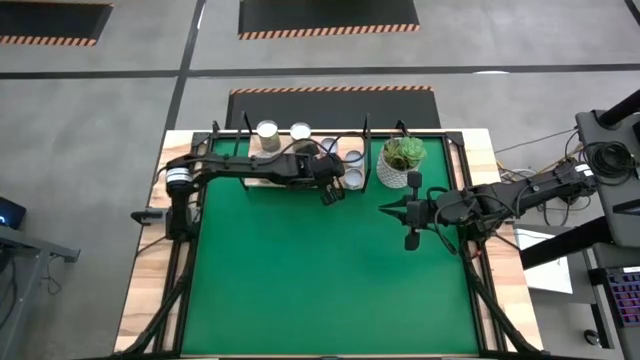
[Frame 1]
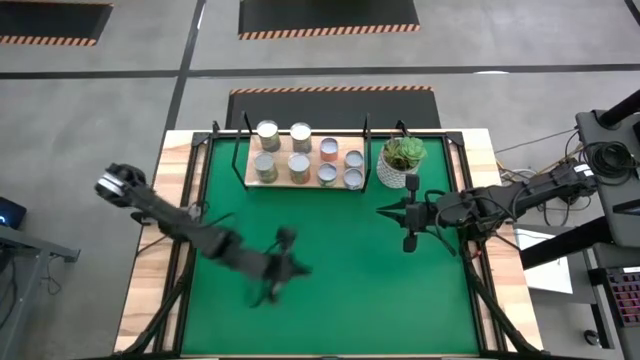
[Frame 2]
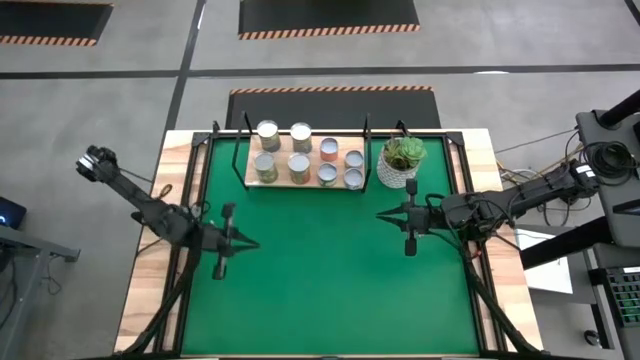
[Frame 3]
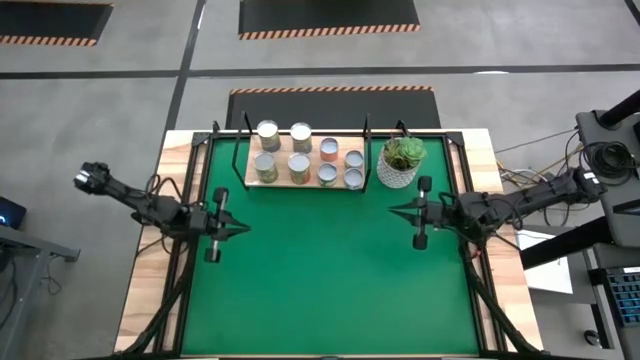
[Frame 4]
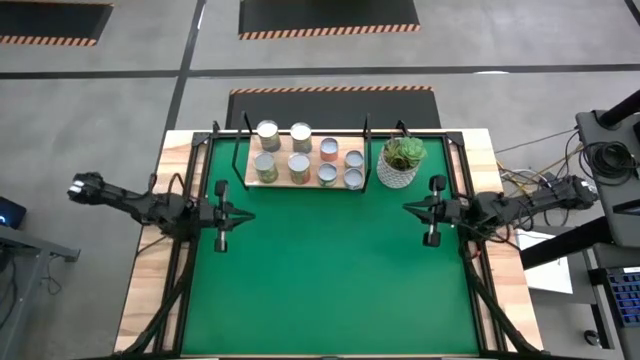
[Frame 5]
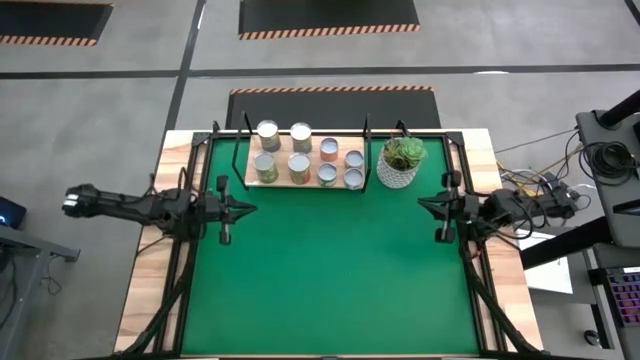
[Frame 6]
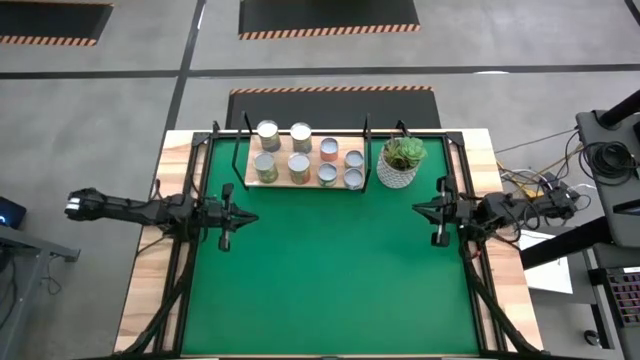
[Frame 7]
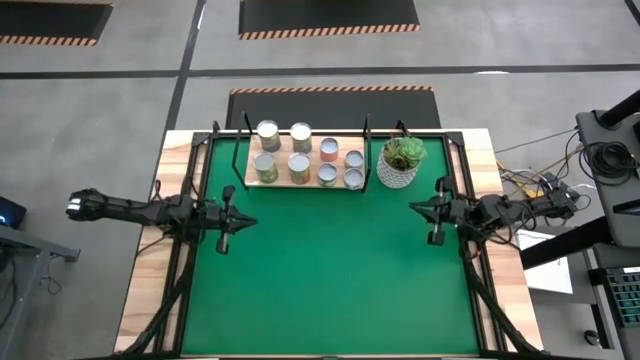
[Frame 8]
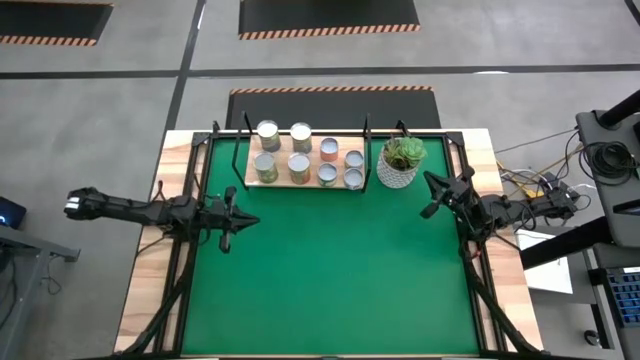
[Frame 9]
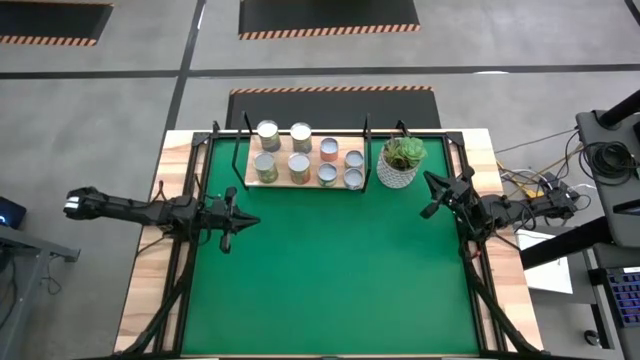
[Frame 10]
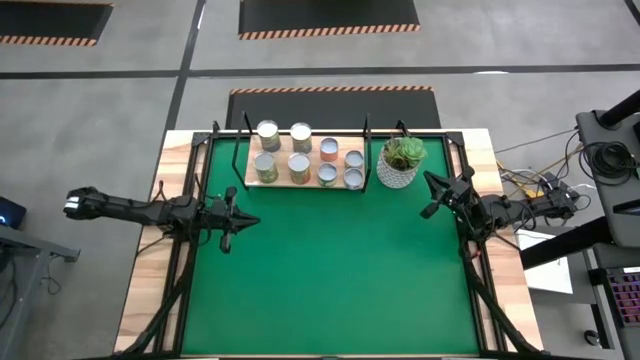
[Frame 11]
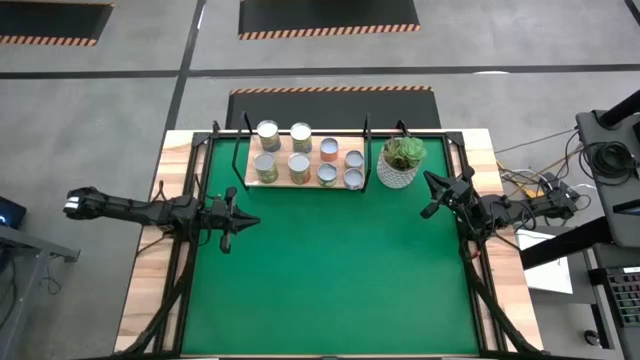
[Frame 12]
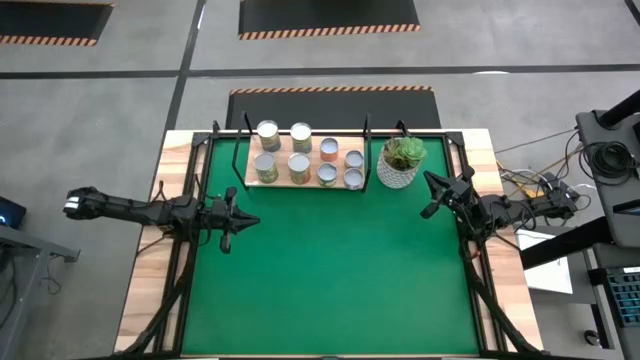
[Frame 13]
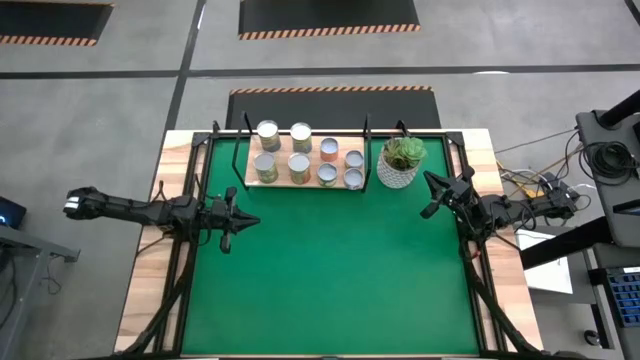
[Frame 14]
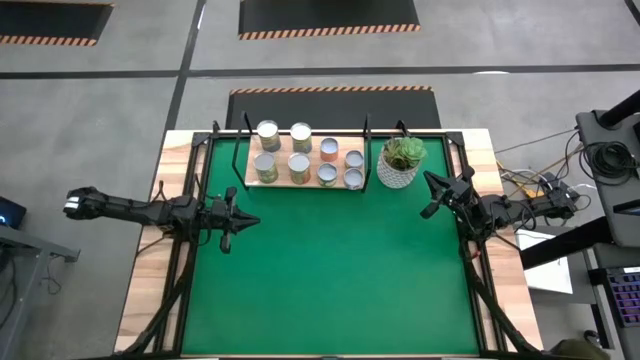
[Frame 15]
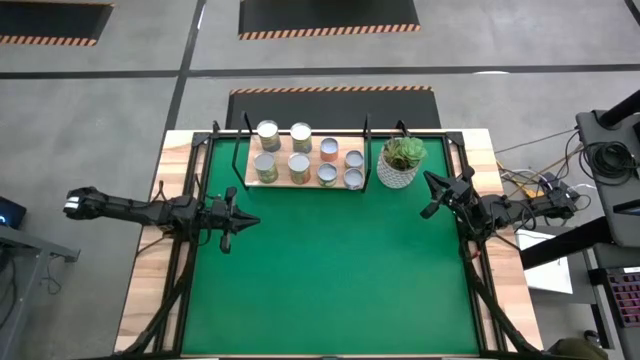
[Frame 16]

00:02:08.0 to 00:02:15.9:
Task: Pick and place cans onto a shelf
Return to Home Position

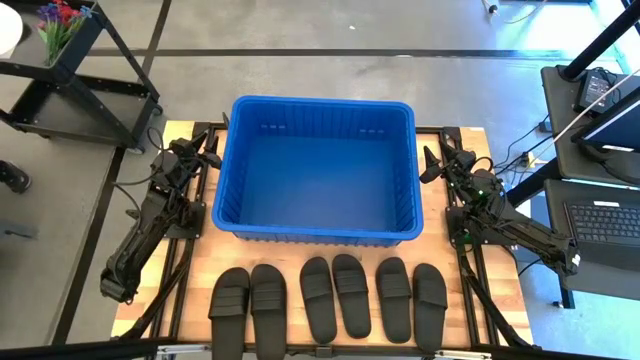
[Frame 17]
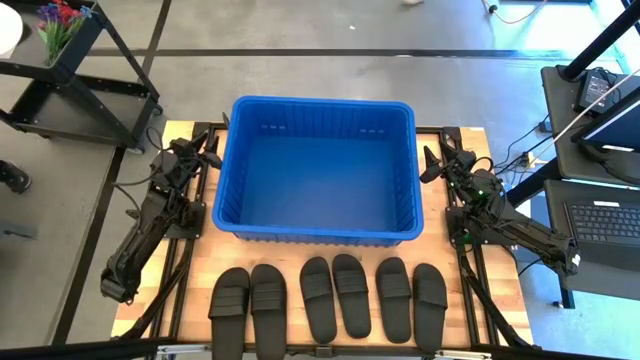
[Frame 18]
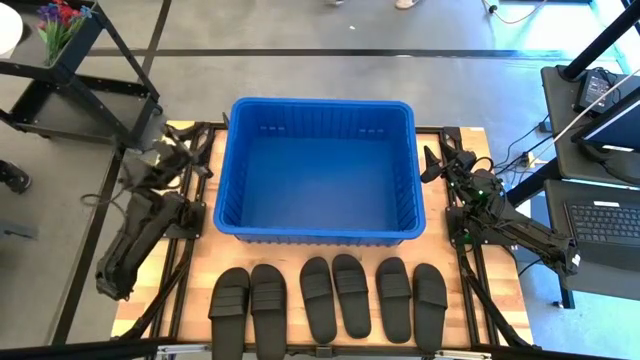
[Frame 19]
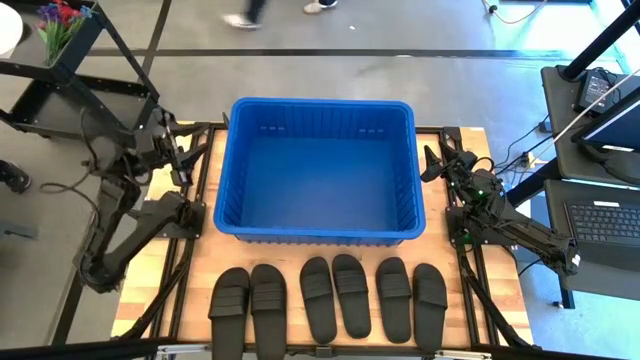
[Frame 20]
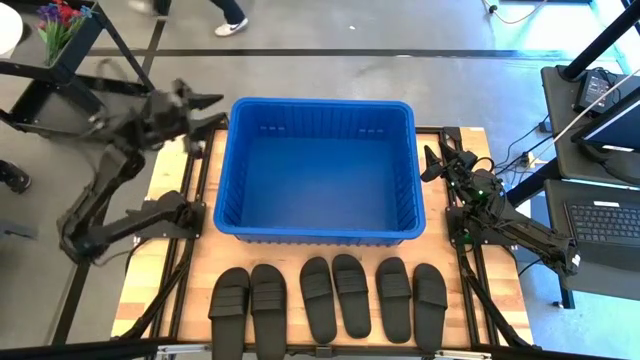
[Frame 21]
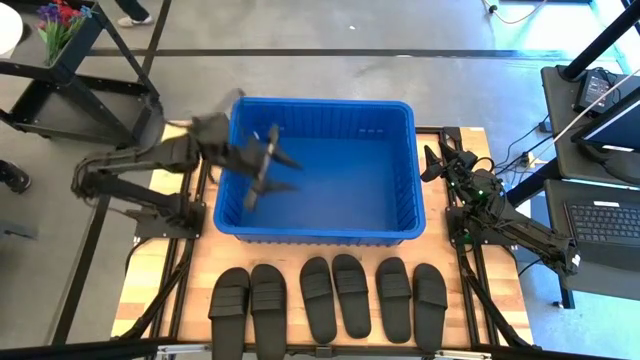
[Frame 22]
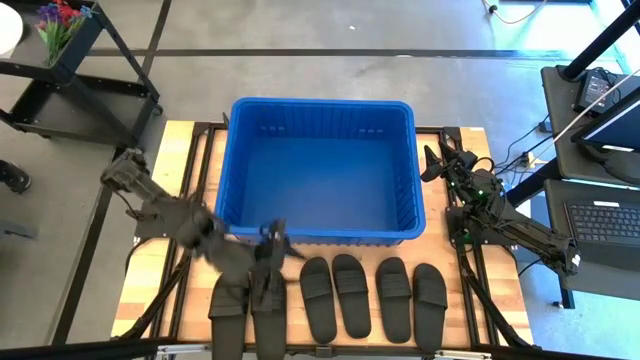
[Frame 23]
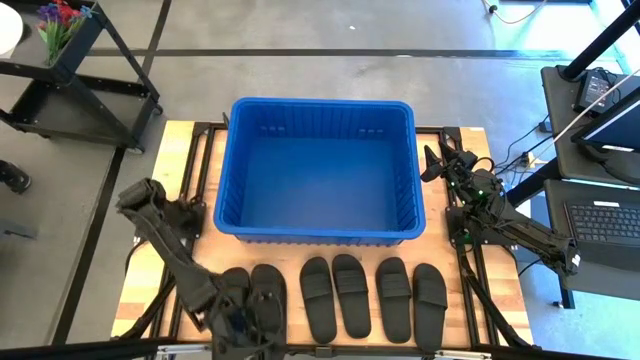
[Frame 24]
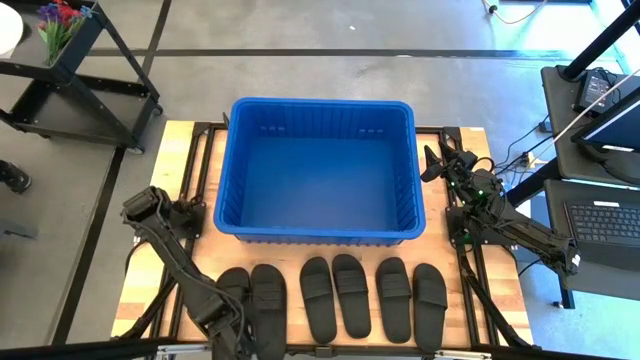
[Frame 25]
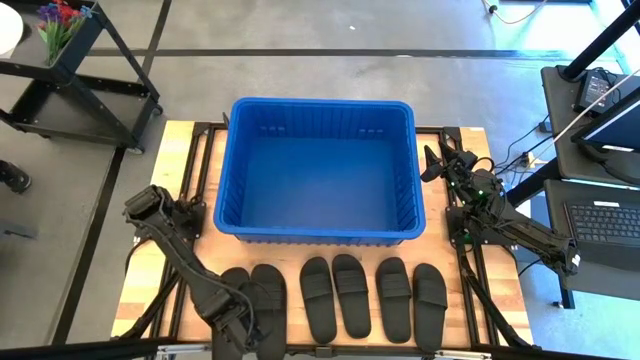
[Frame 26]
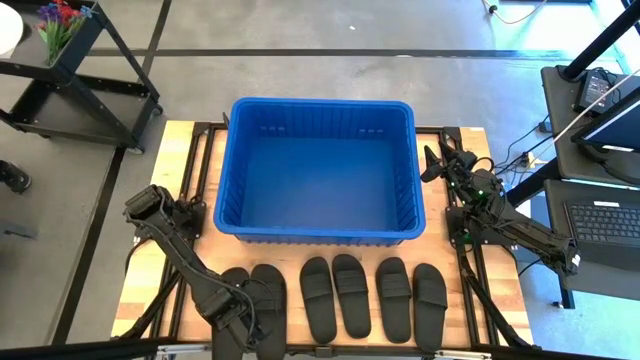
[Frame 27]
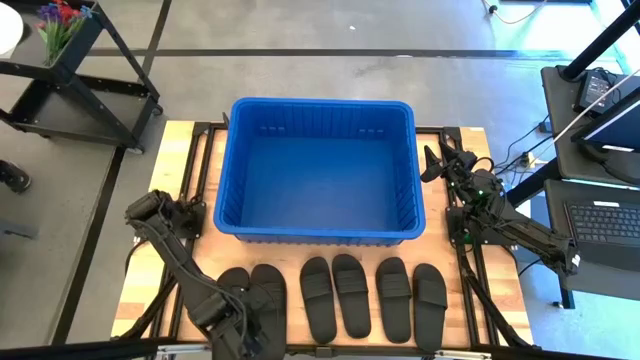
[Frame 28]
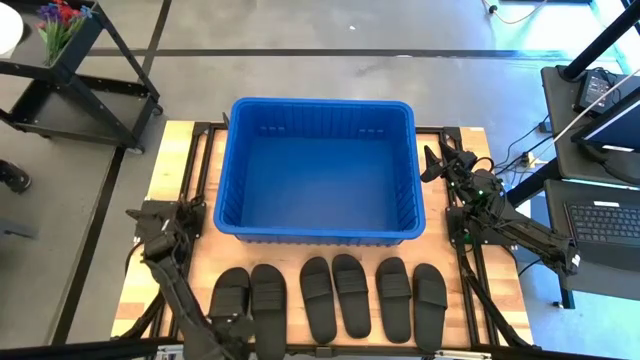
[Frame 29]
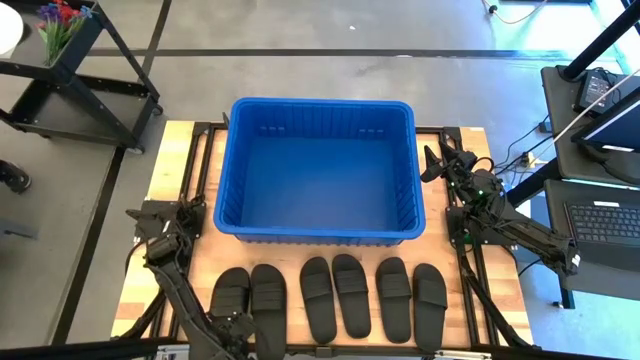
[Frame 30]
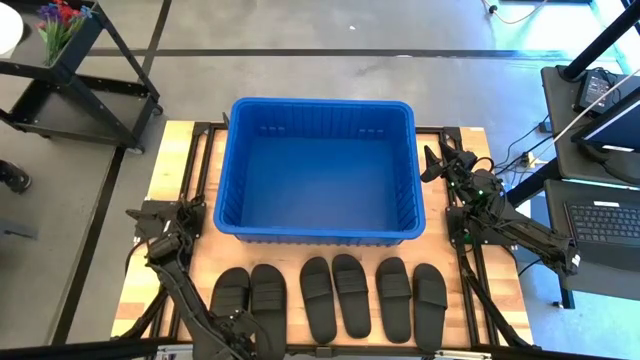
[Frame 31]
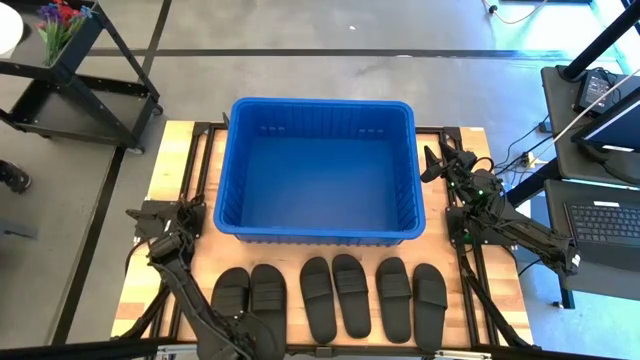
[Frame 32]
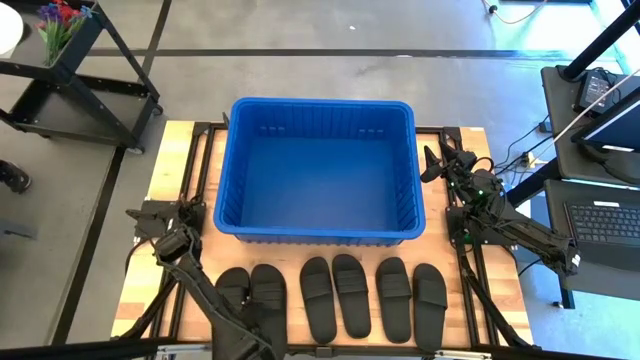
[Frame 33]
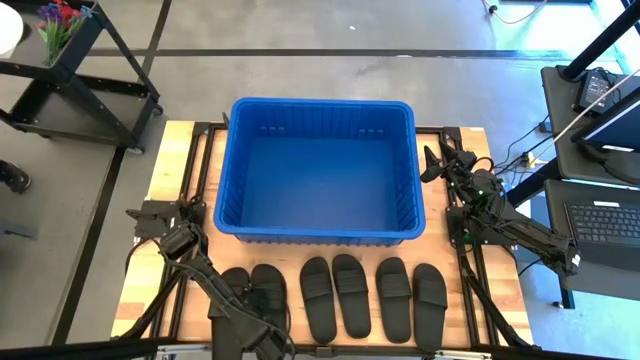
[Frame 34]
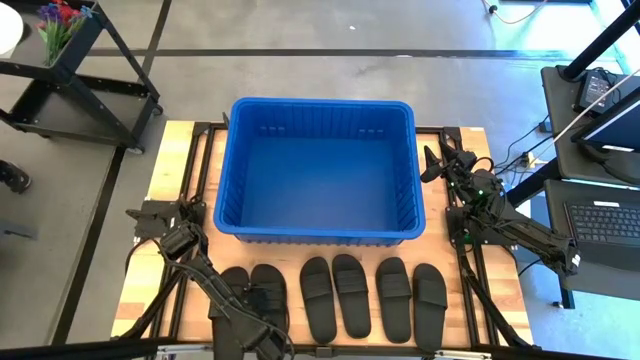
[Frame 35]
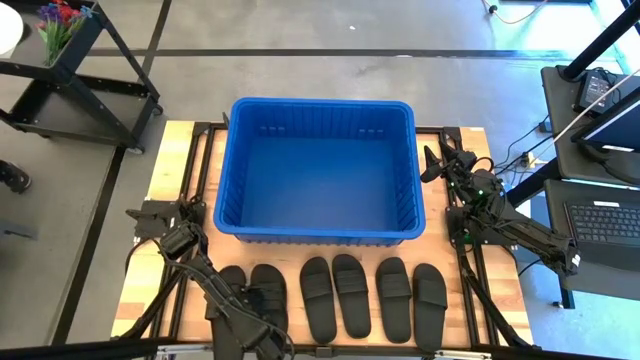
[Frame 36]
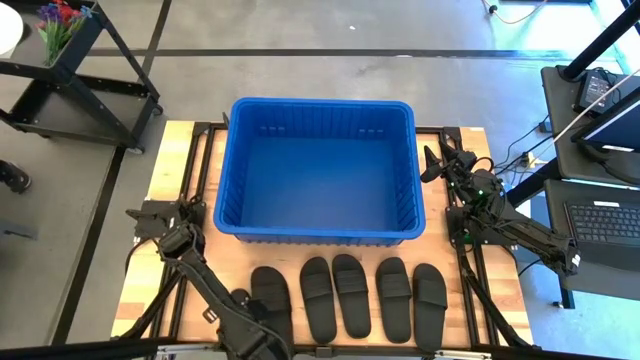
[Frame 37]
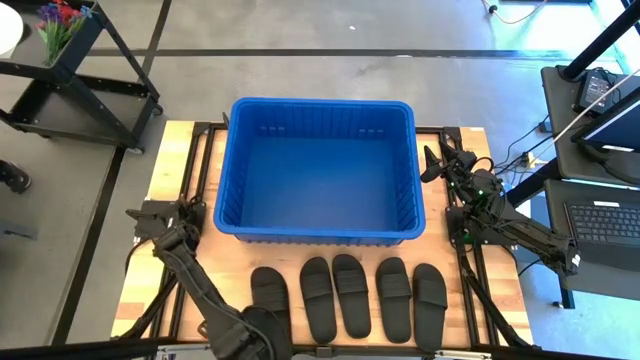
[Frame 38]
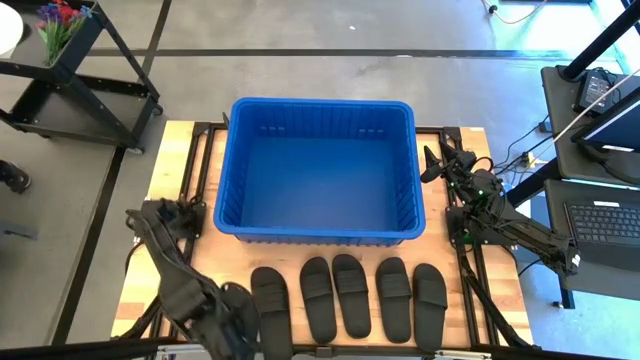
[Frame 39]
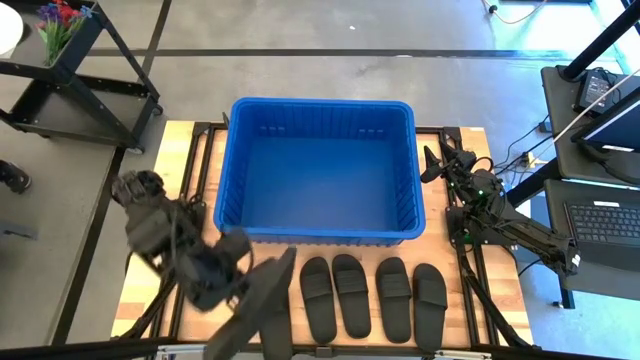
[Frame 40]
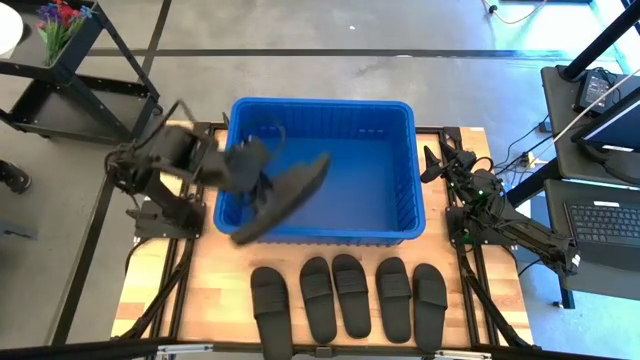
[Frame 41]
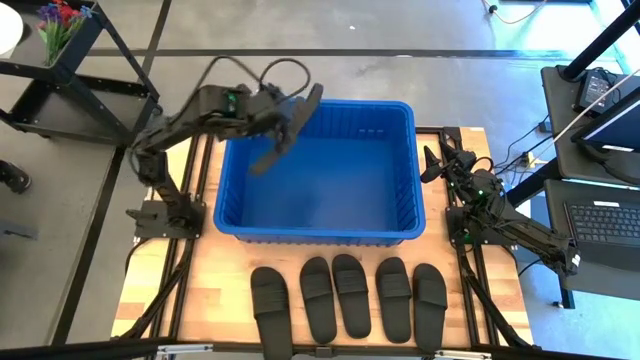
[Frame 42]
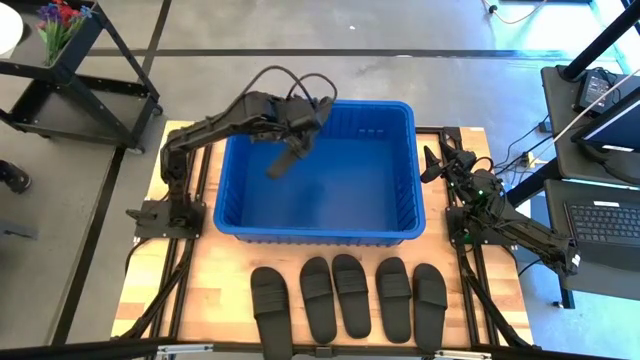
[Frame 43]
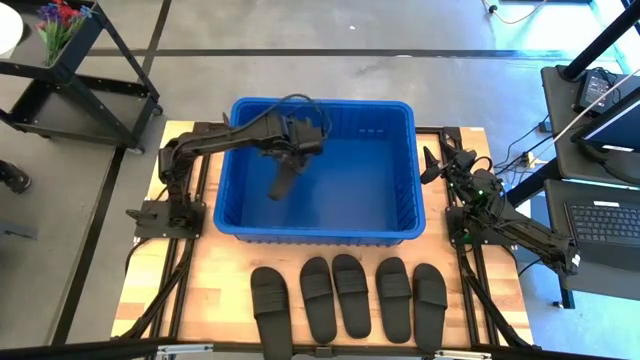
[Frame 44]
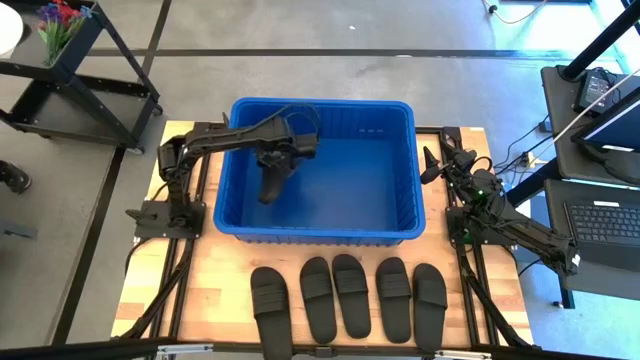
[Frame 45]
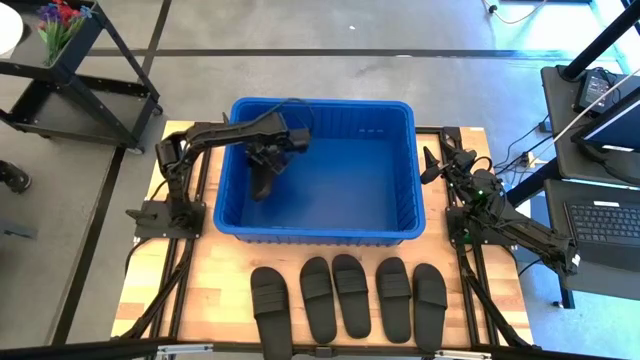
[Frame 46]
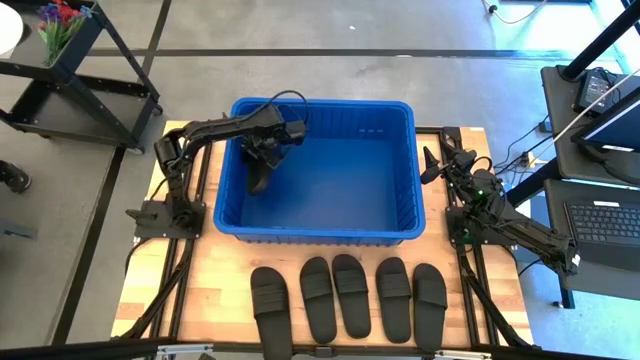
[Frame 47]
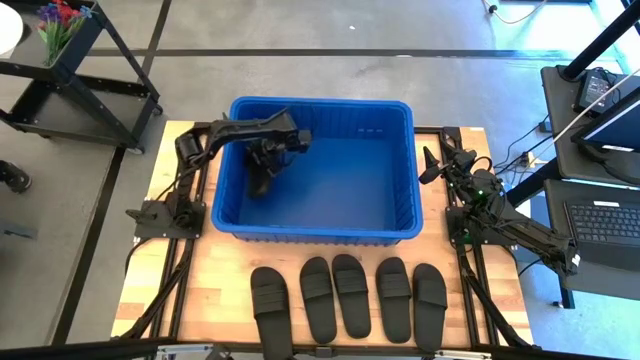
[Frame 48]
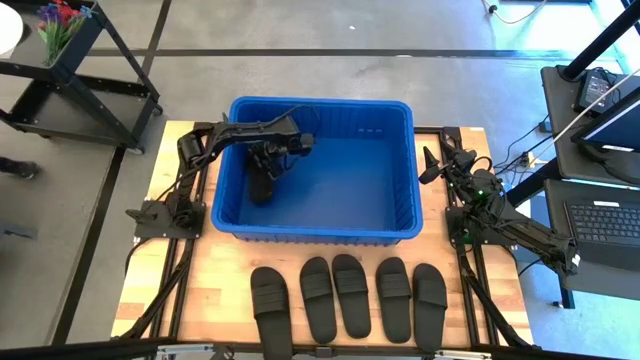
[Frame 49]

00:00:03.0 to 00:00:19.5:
Task: Pick and place slides into bin
Put the black slide into the blue bin
